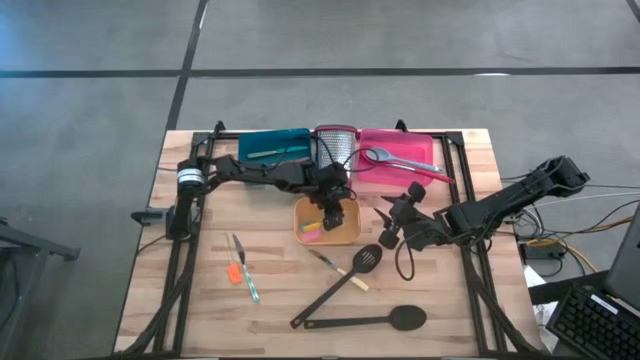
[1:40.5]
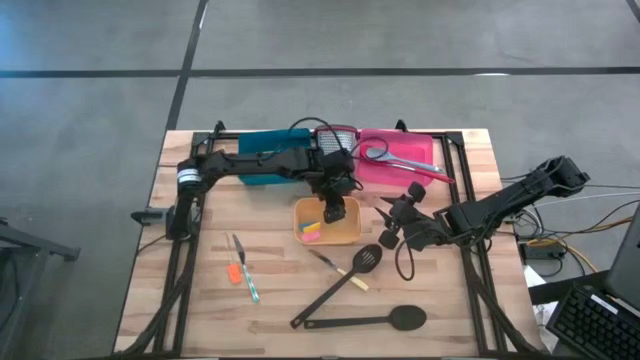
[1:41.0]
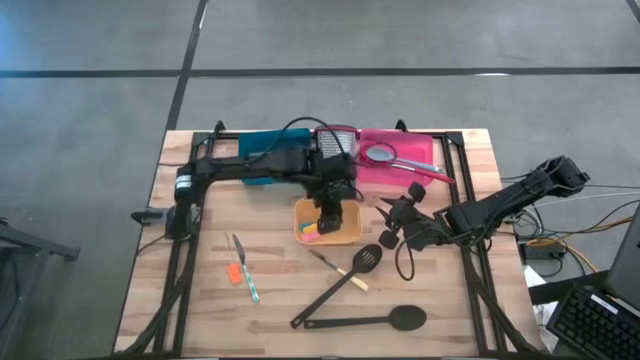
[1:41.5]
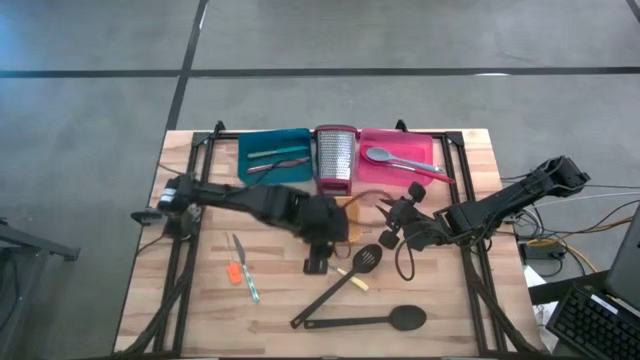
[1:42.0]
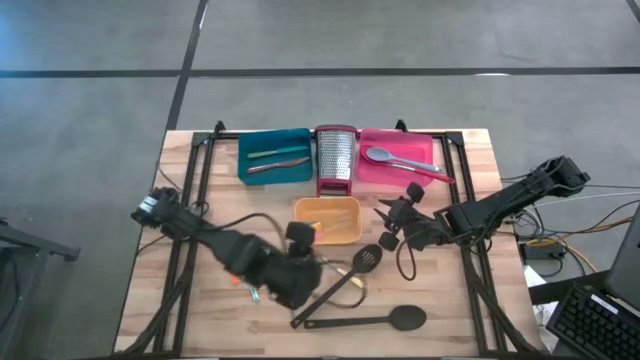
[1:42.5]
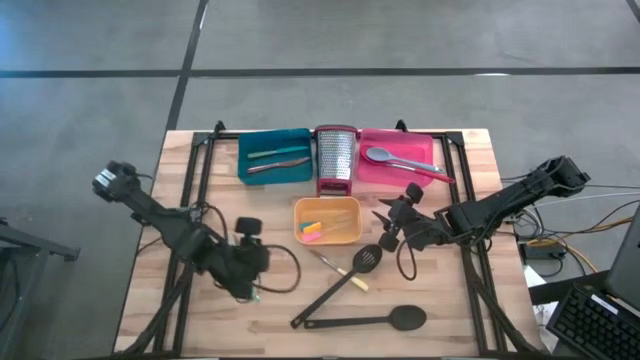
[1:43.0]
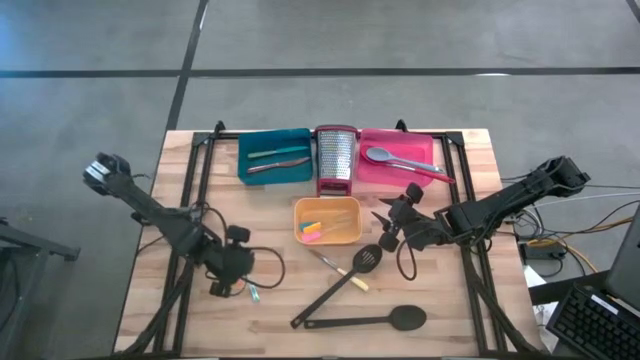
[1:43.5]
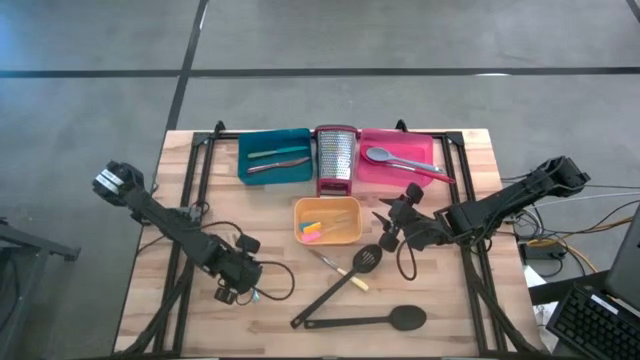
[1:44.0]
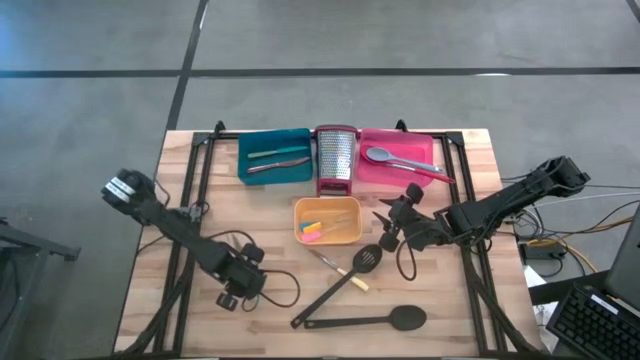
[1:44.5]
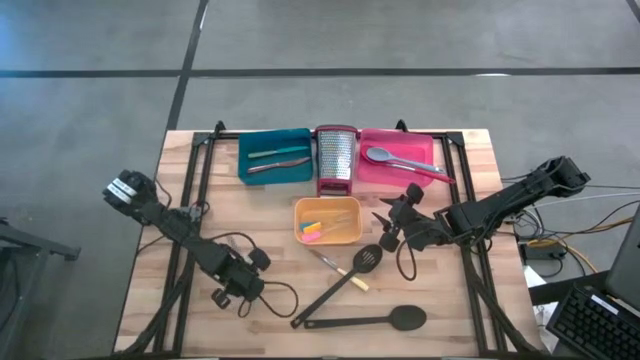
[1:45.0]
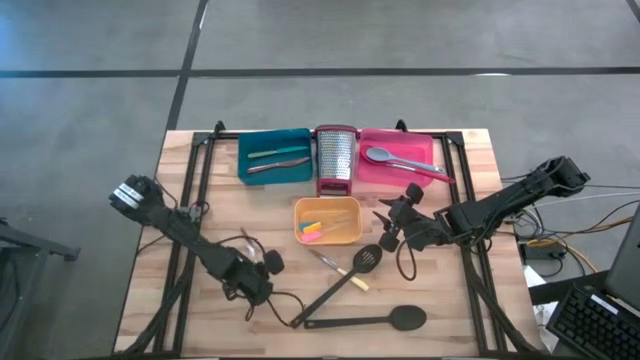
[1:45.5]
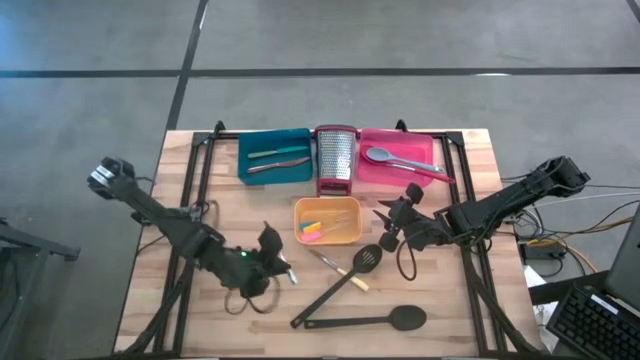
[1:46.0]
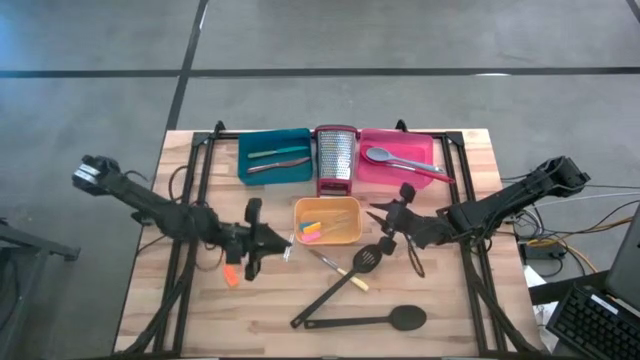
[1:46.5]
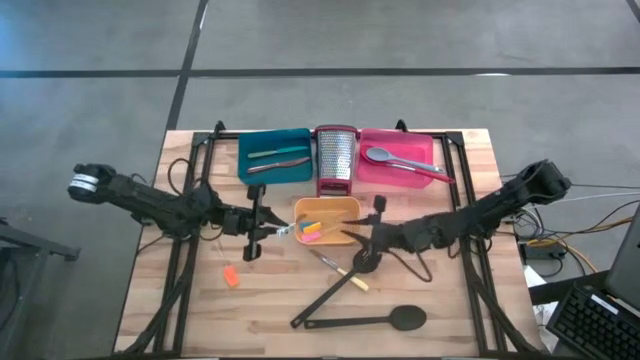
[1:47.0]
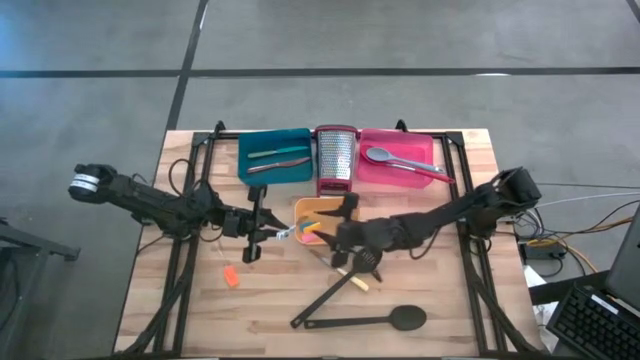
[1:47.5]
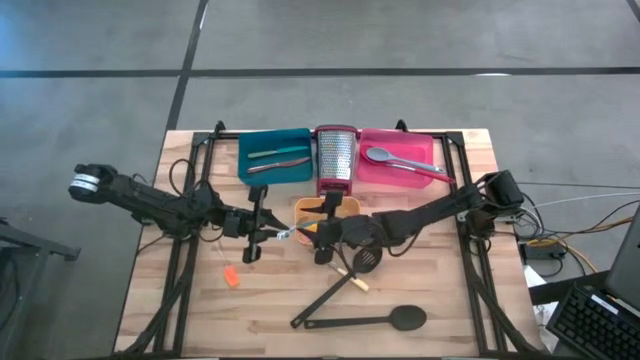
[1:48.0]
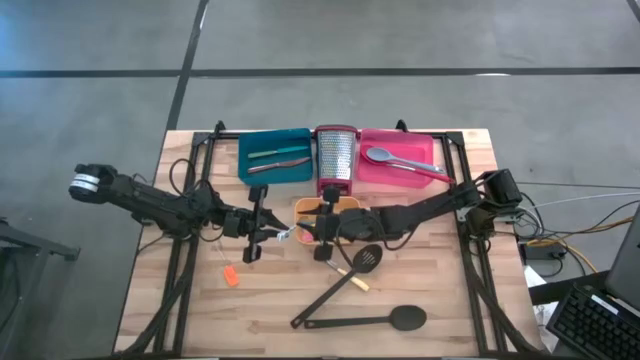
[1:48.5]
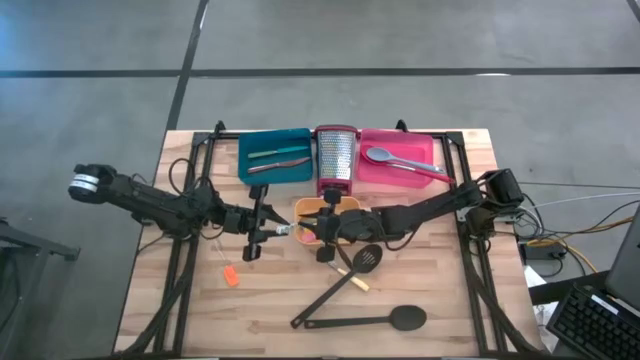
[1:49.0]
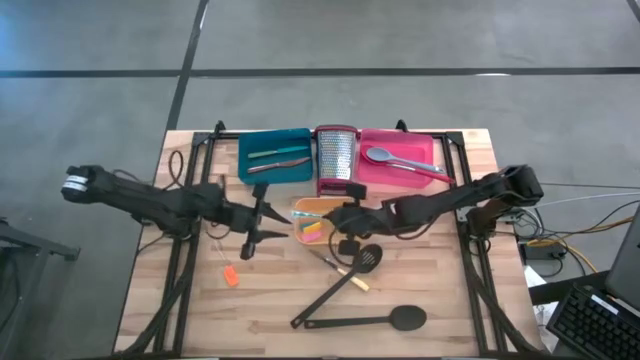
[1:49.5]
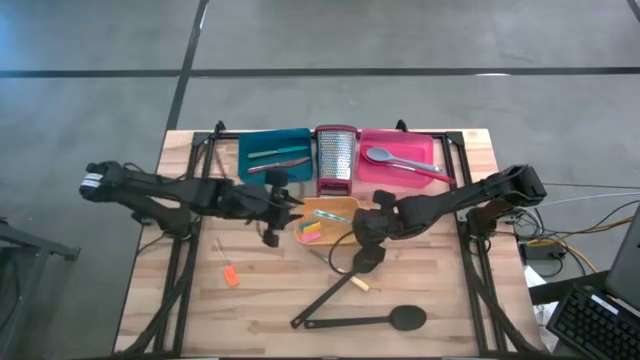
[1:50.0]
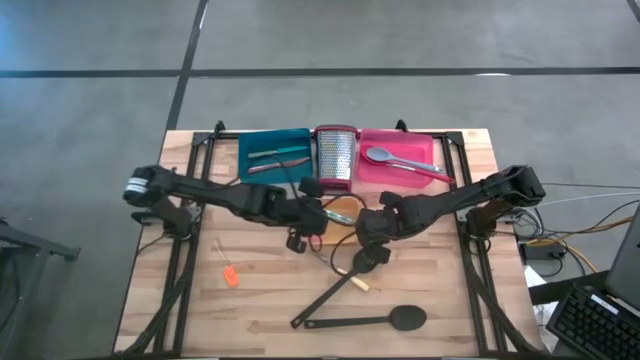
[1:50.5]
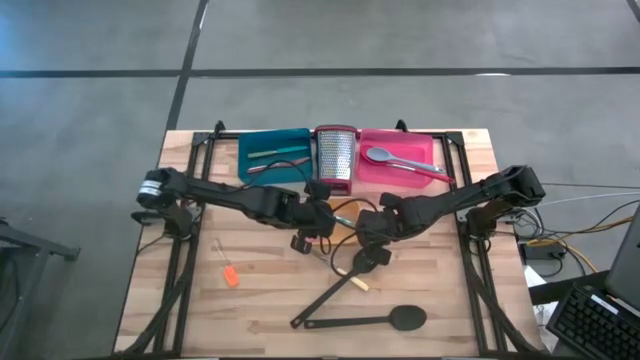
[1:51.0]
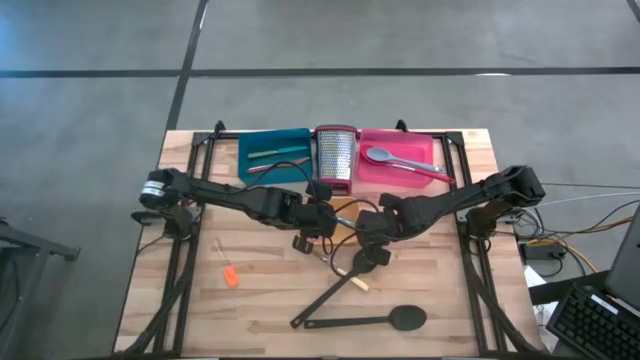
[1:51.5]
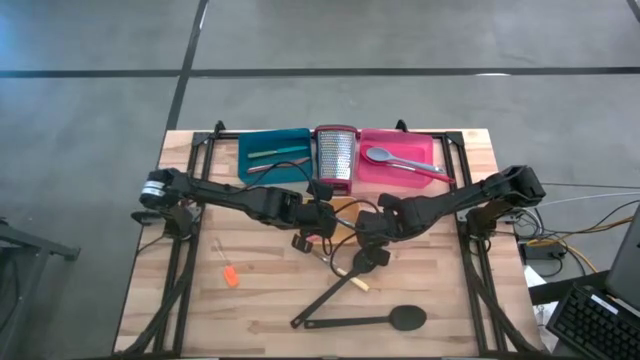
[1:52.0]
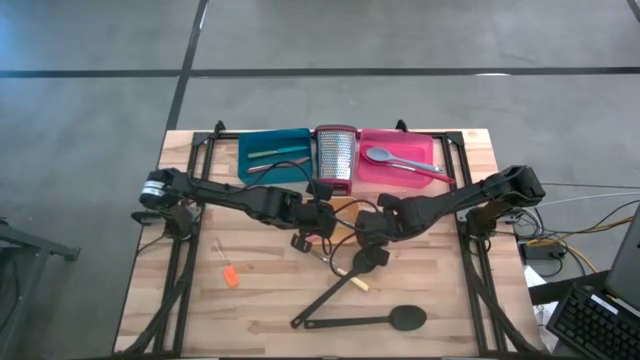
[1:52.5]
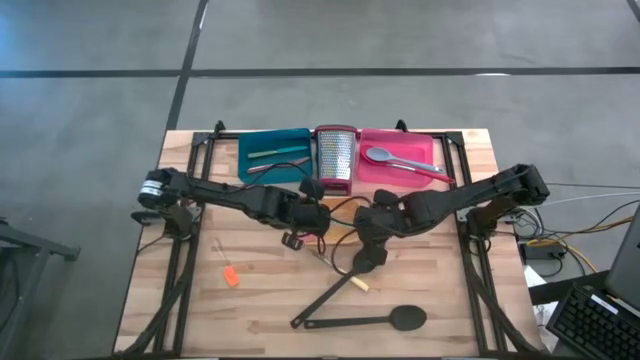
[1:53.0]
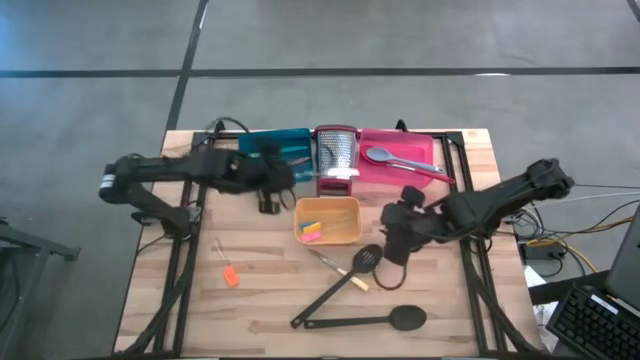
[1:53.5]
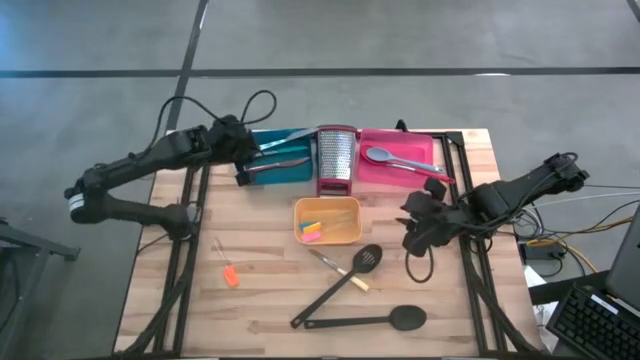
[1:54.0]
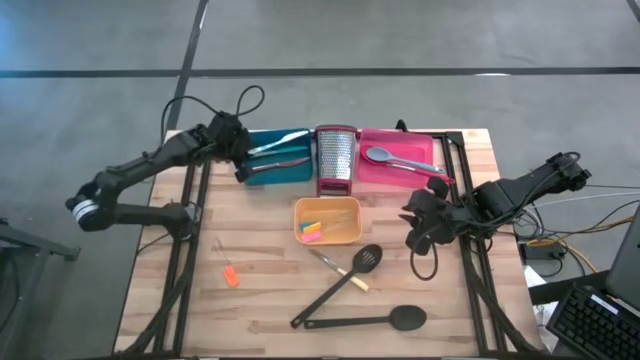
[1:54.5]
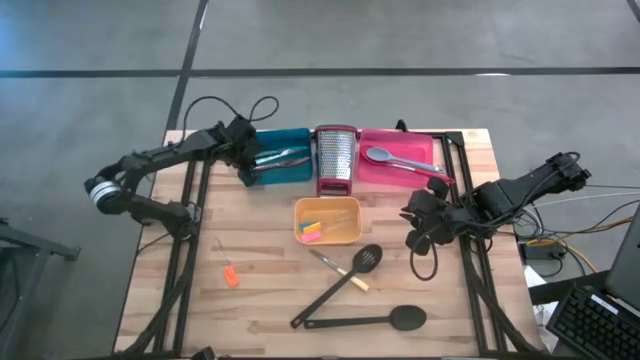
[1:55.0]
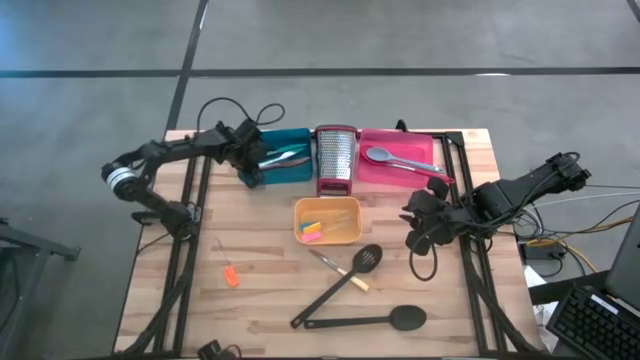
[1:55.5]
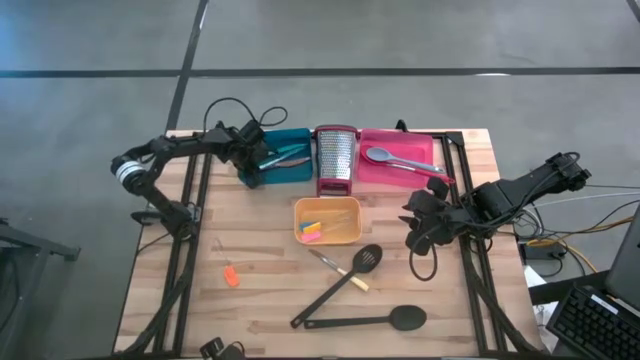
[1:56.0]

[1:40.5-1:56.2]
Task: Pick & Place Kitchen Items
Put the blue patterned table knife into the blue bin

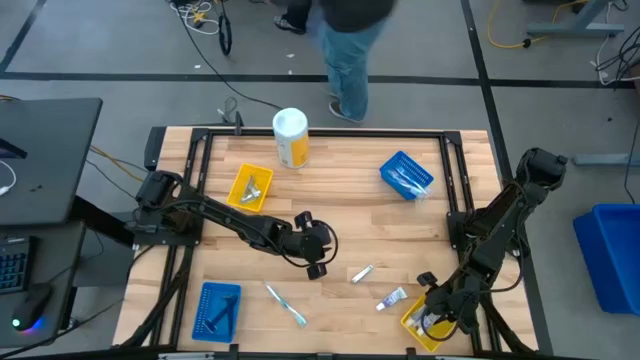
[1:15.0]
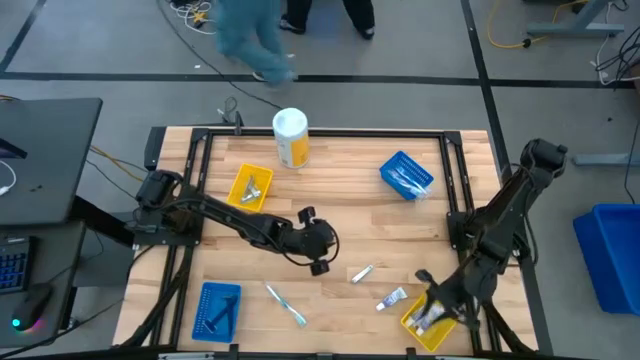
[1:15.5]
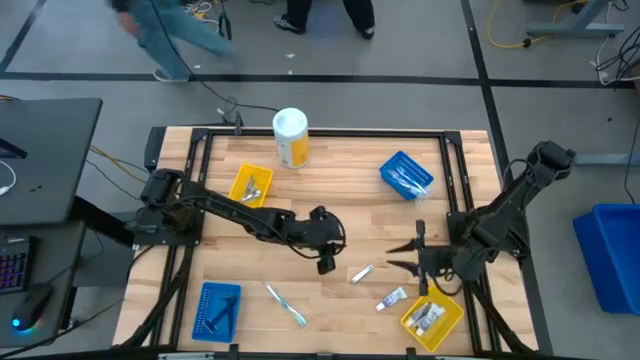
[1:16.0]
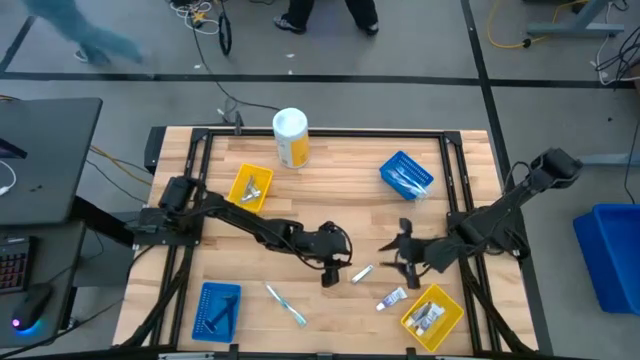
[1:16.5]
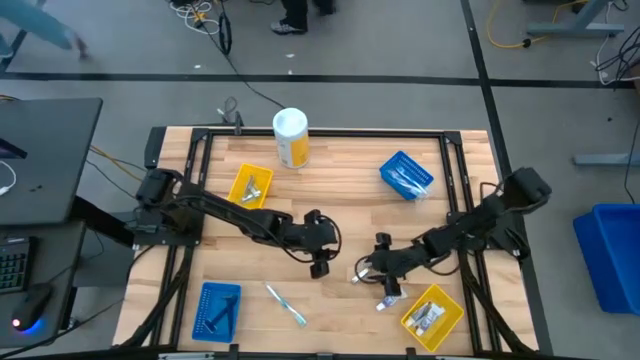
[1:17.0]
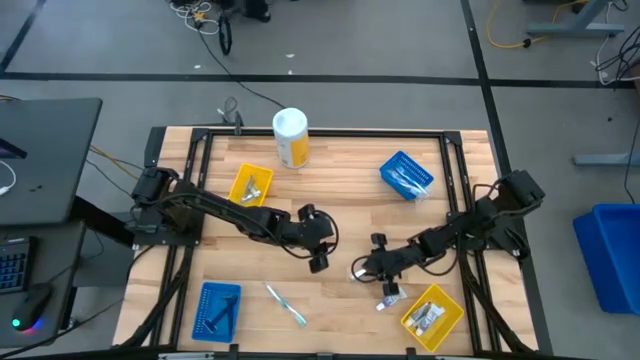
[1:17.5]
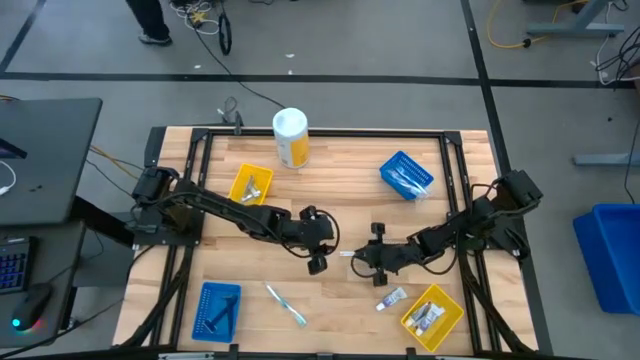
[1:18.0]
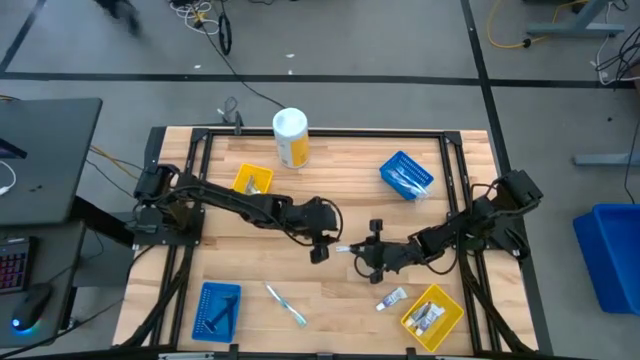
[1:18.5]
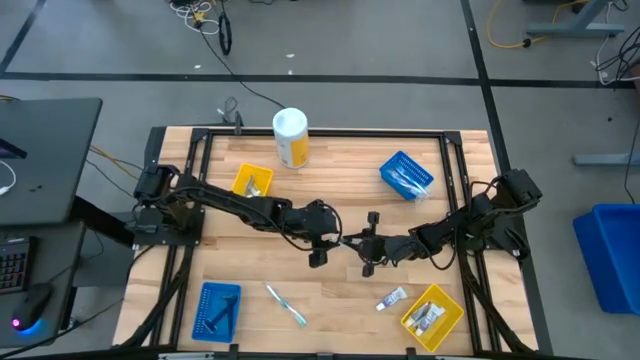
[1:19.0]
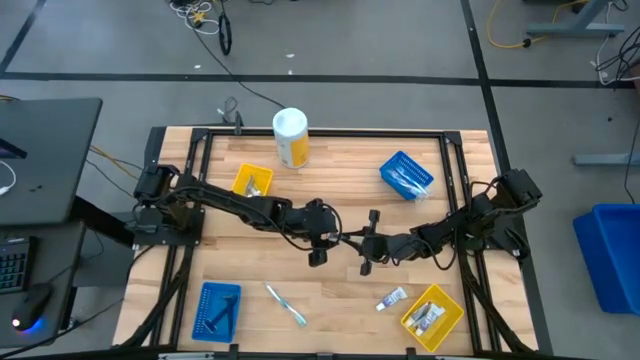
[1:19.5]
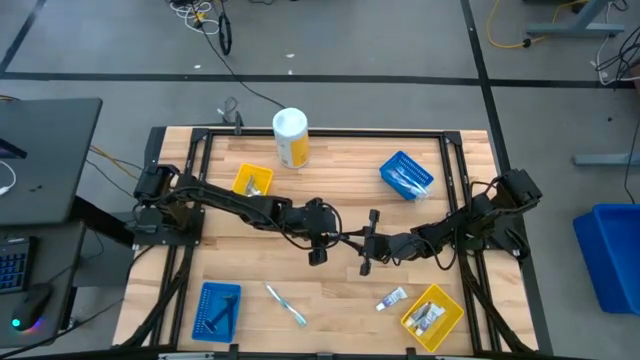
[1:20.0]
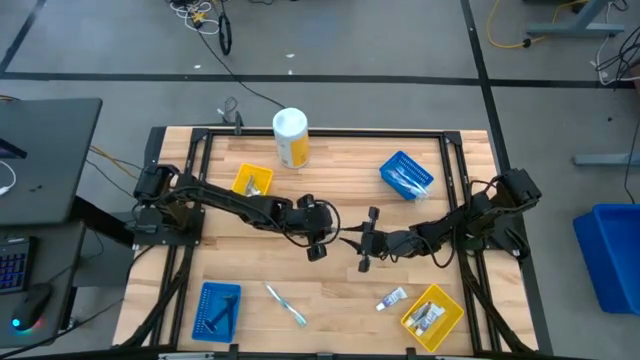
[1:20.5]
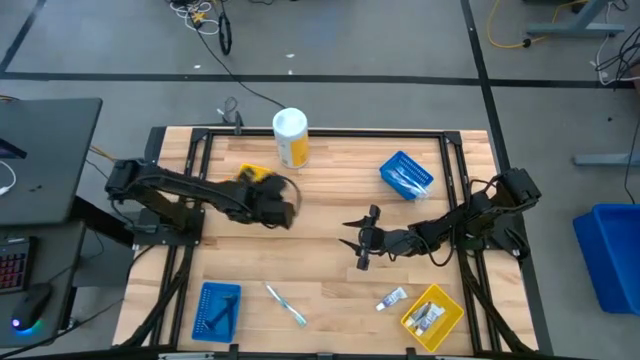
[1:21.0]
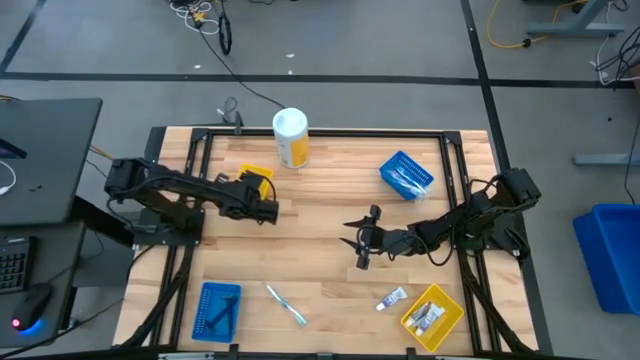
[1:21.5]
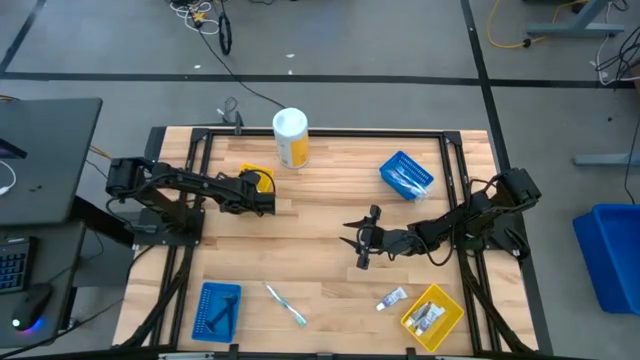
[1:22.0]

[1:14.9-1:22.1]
Task: Pick & Place Travel size toiletries
Put the silver nail cutter into the top yellow bin
